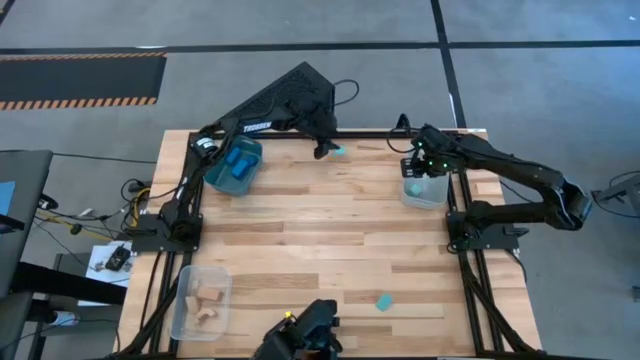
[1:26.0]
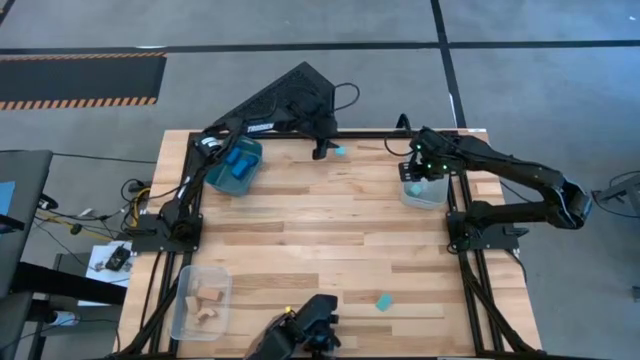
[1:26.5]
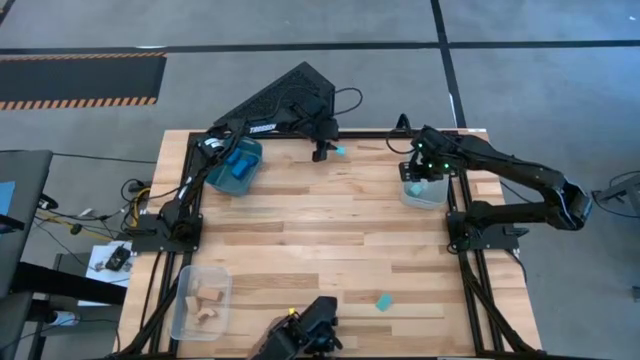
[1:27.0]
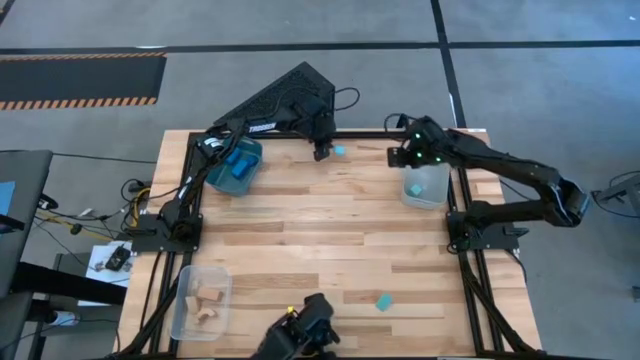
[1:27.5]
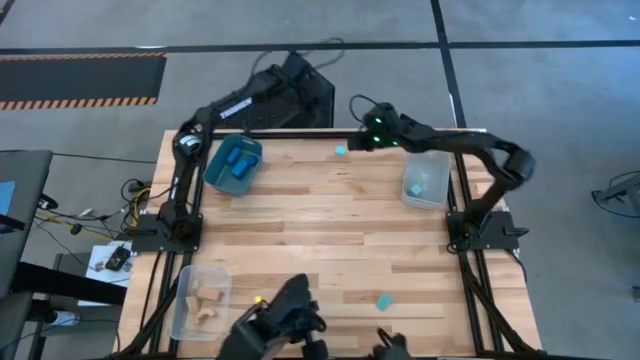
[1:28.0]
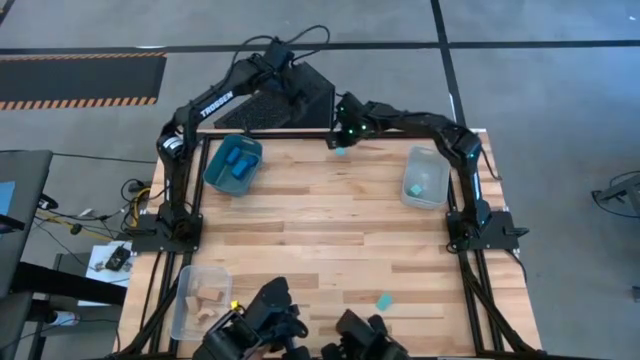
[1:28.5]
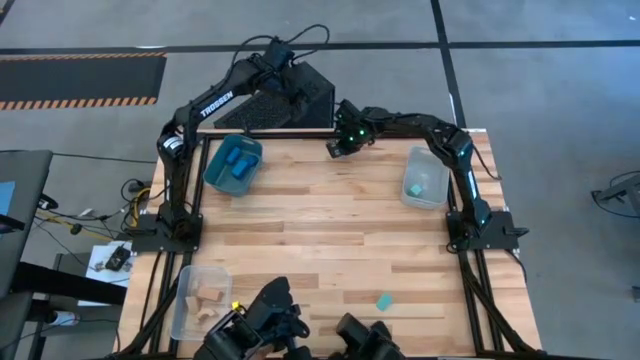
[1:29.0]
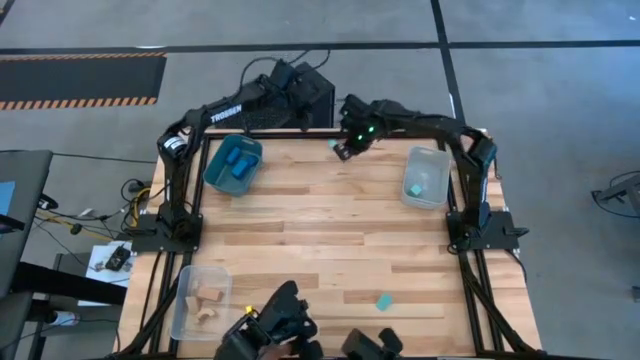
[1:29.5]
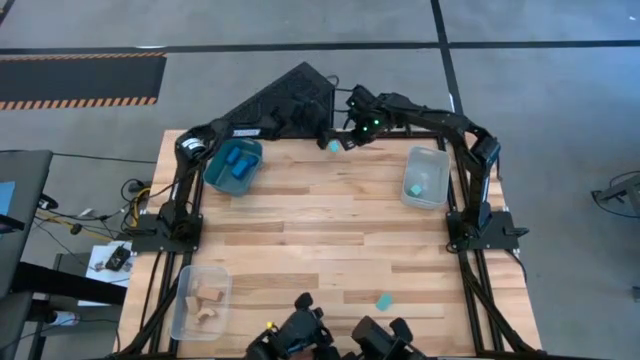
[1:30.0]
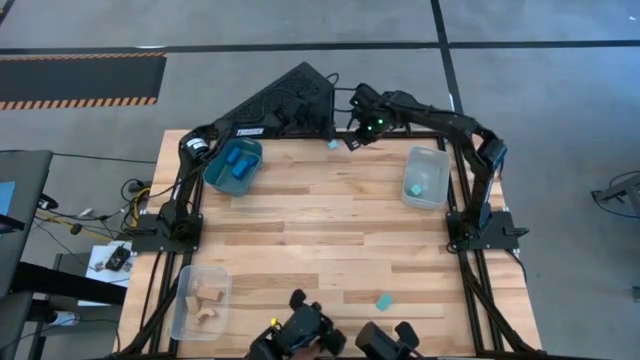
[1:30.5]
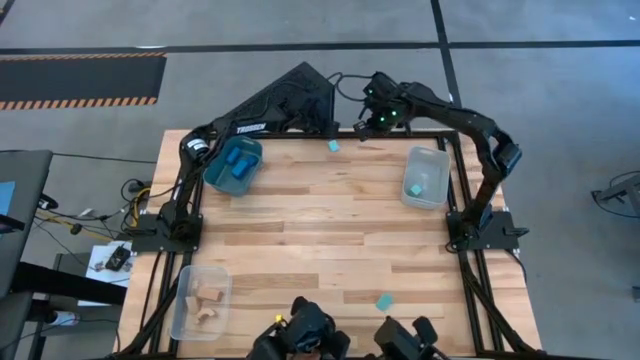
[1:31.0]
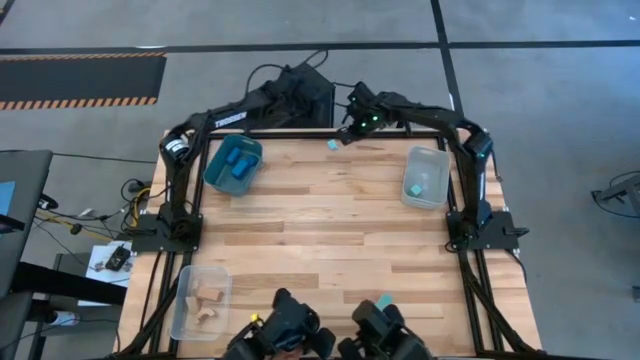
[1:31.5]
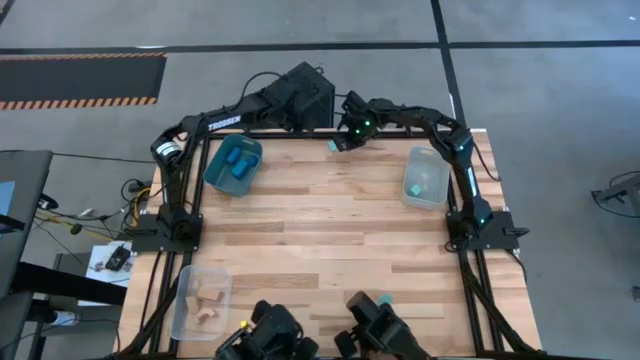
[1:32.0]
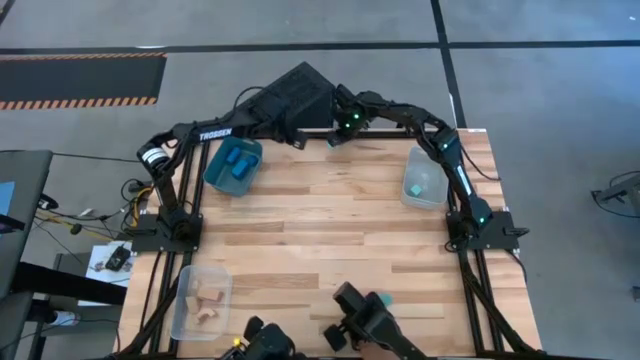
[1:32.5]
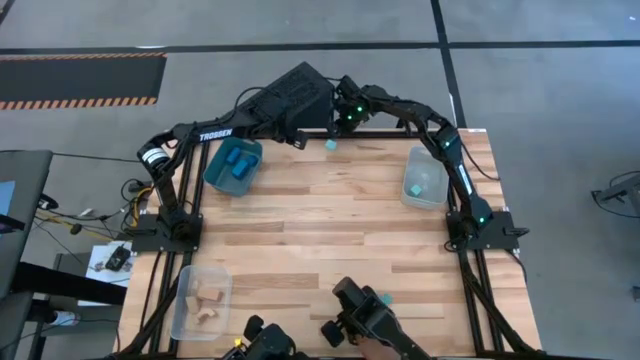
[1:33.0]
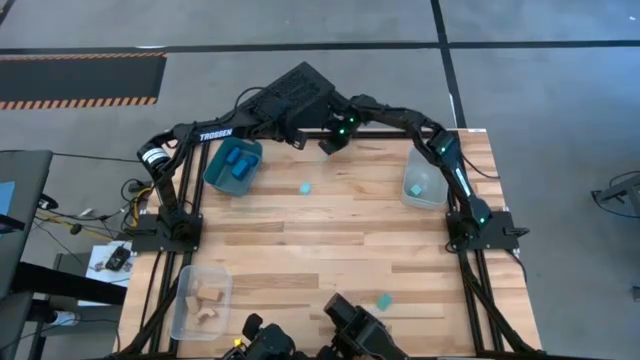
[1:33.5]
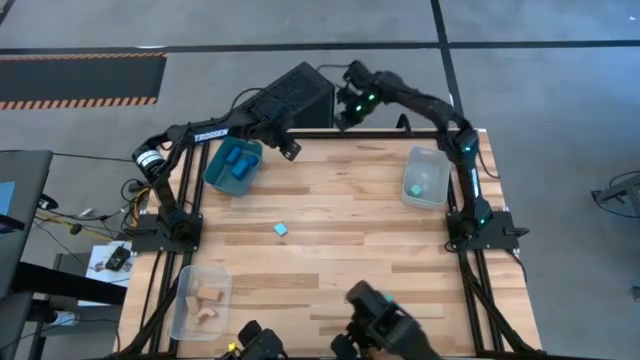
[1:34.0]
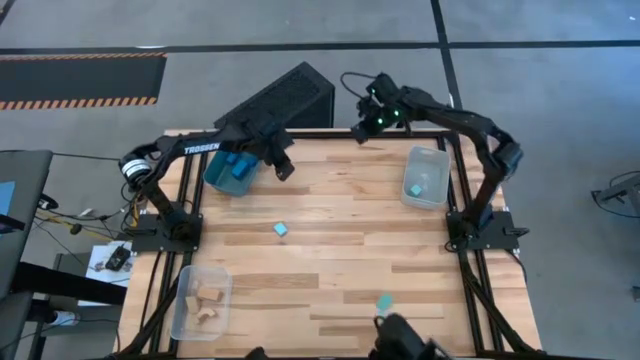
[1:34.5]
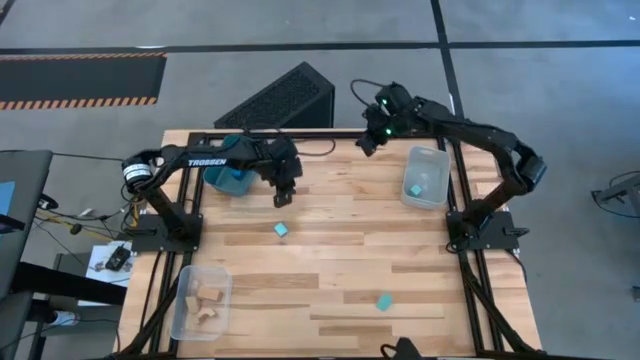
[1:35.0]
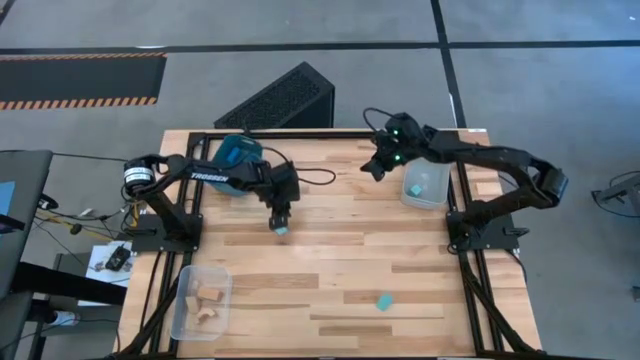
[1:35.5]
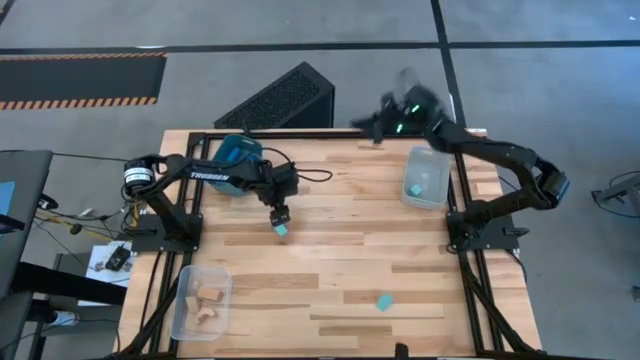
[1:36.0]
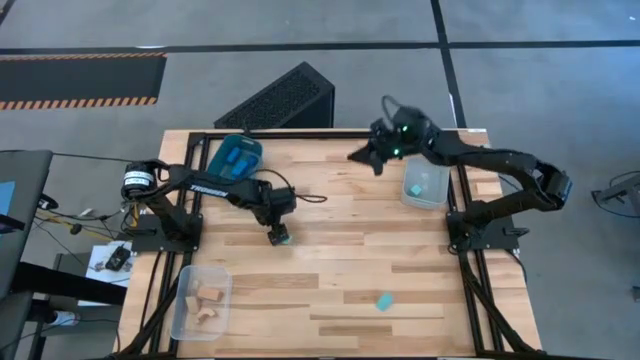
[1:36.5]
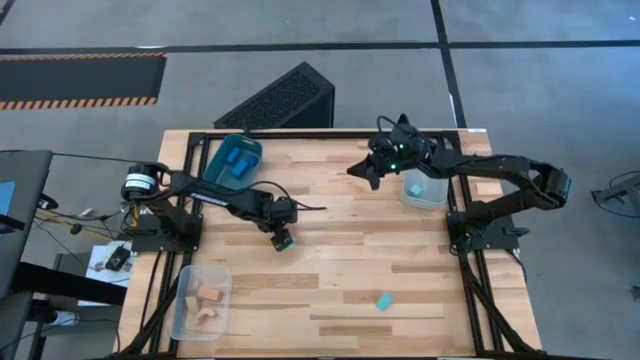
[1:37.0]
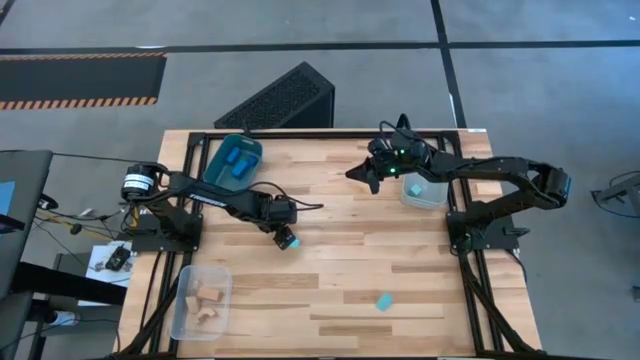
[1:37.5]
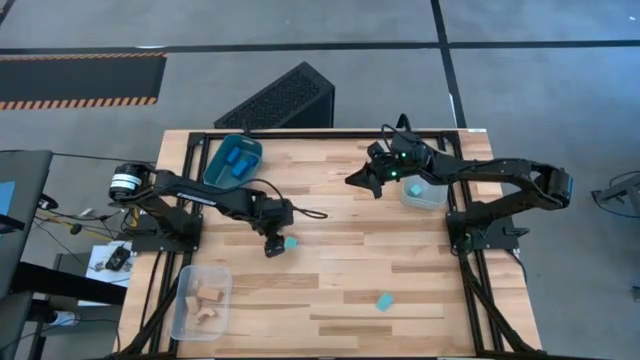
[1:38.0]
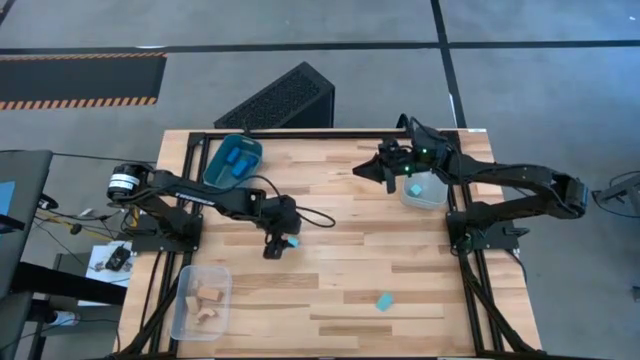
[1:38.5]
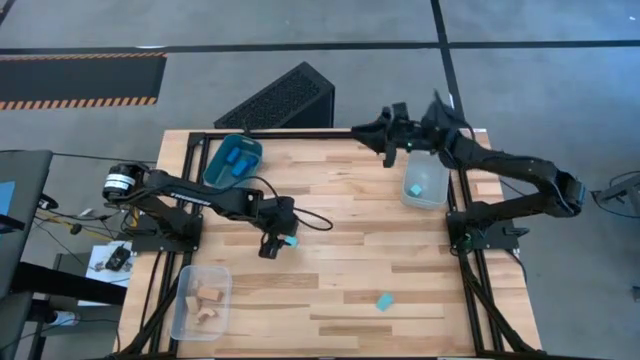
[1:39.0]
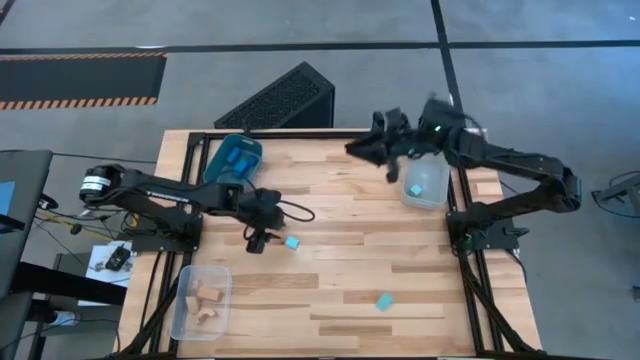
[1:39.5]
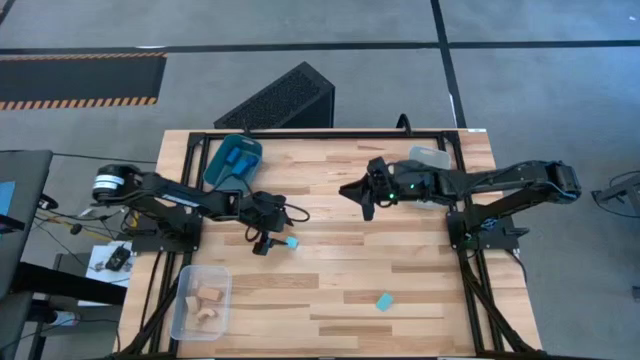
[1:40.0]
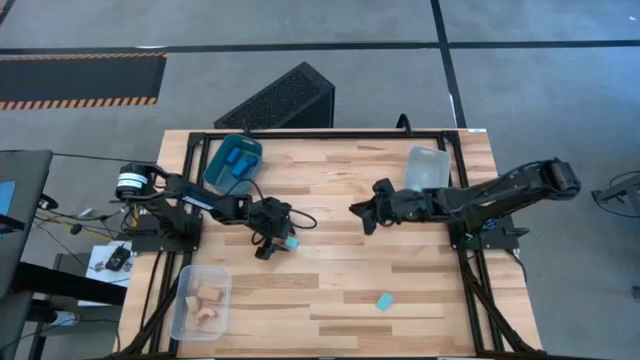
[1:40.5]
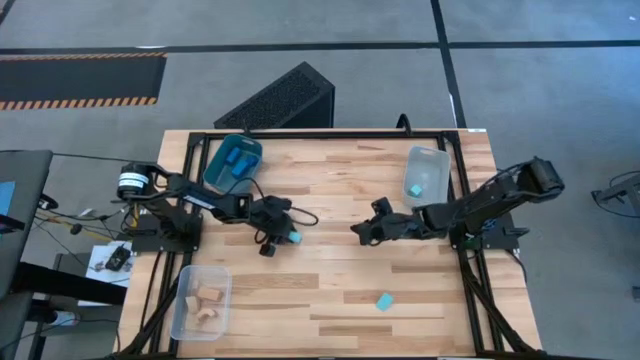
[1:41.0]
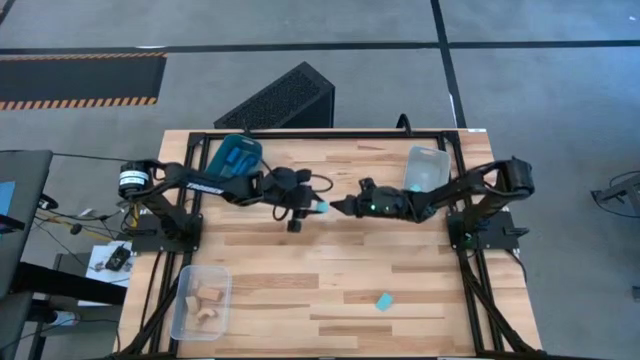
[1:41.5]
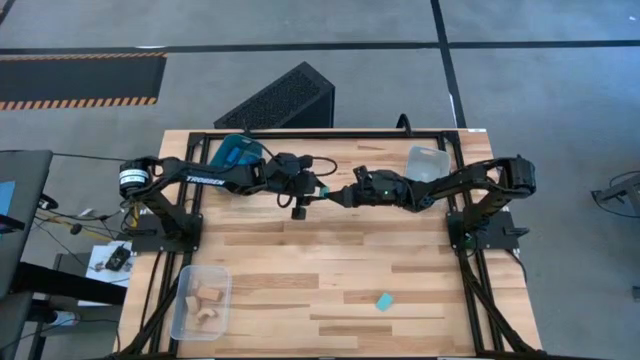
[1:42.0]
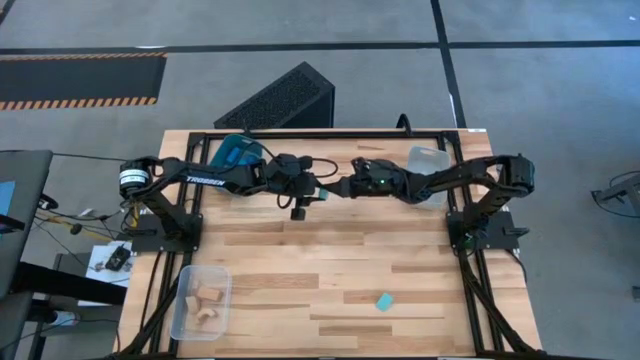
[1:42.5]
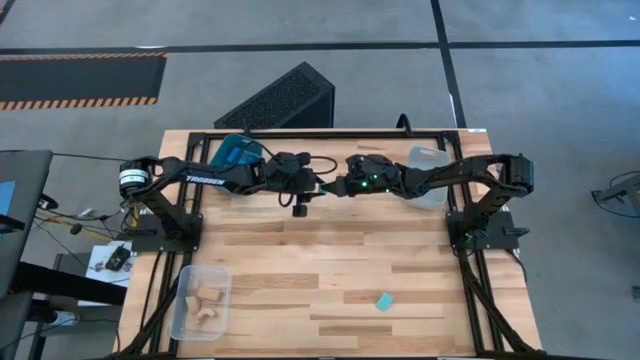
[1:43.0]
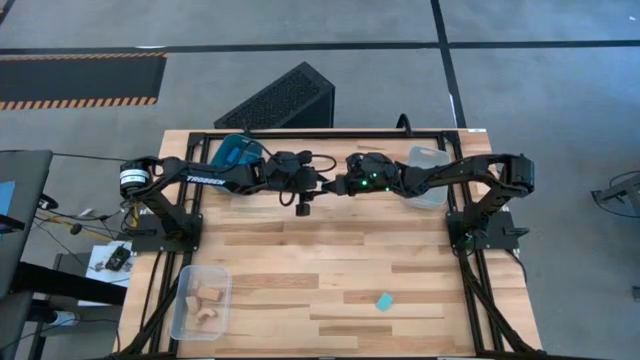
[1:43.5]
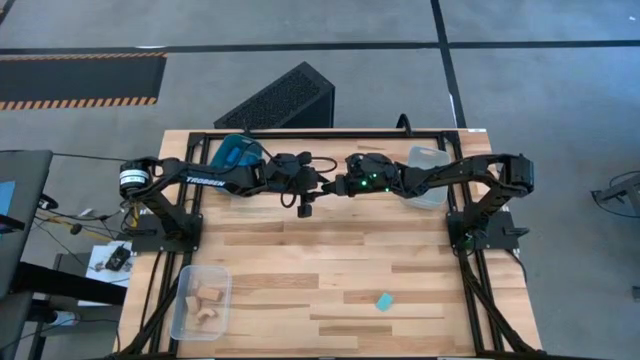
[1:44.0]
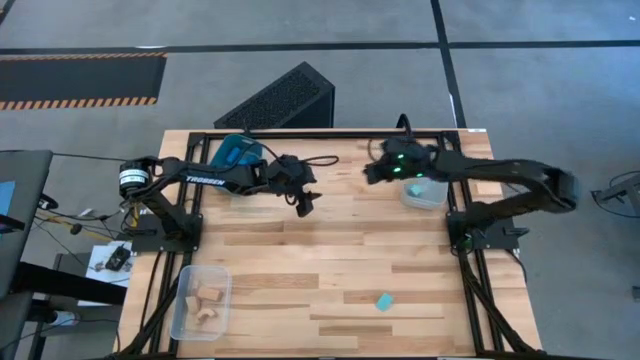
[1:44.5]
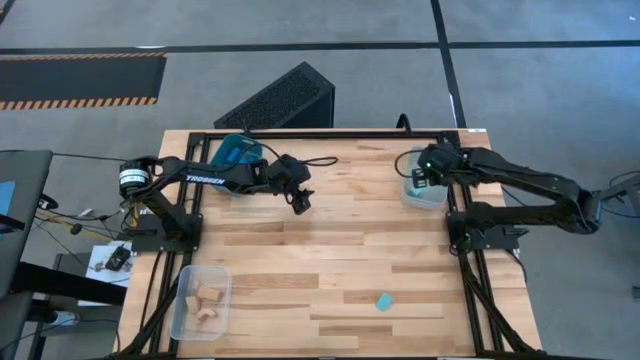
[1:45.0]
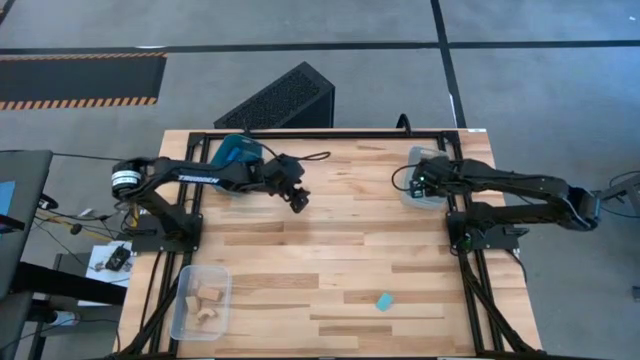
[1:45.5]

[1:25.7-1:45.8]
Task: Sort & place blocks by color
Put the top light blue block into the gray bin

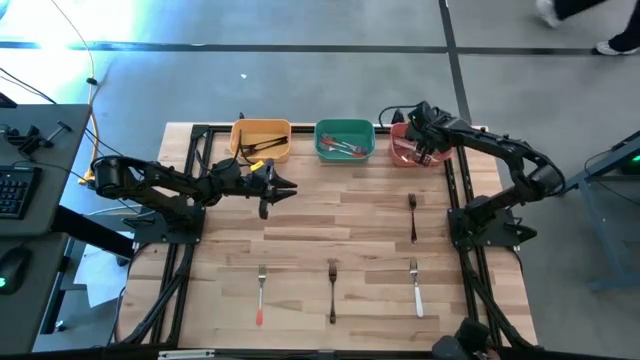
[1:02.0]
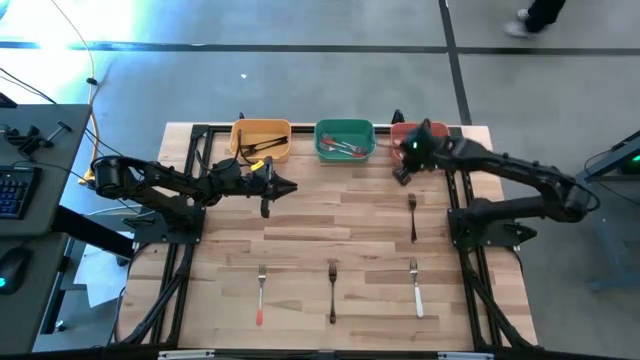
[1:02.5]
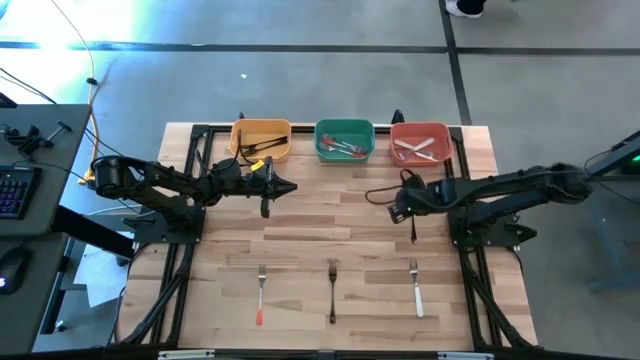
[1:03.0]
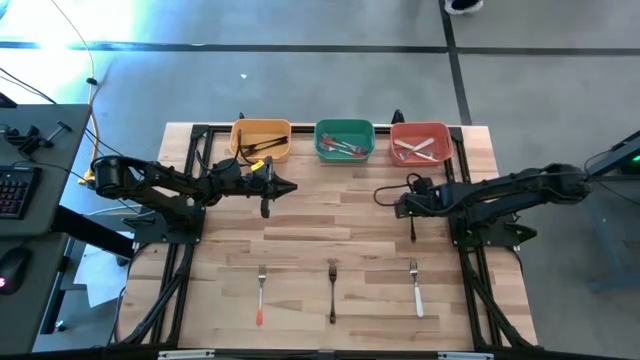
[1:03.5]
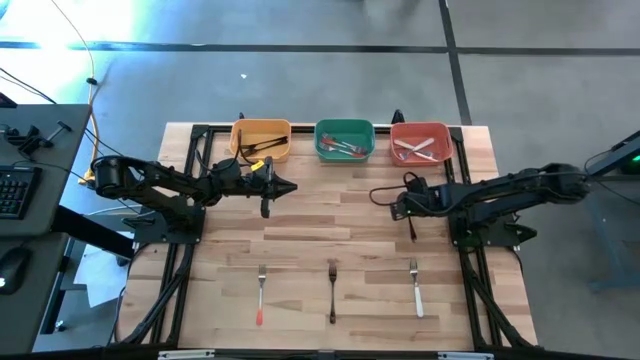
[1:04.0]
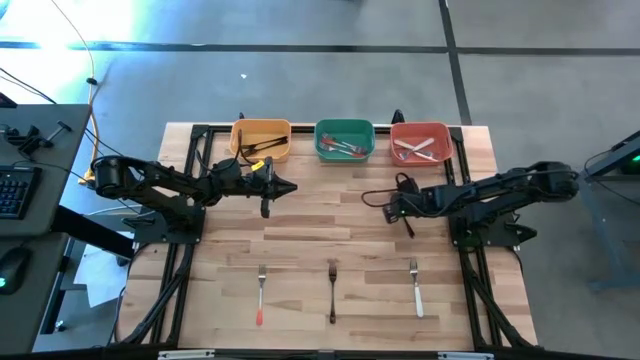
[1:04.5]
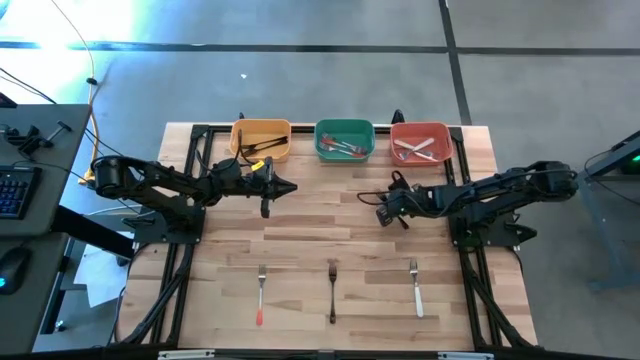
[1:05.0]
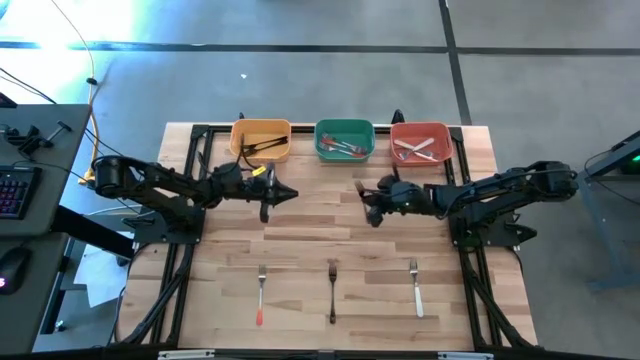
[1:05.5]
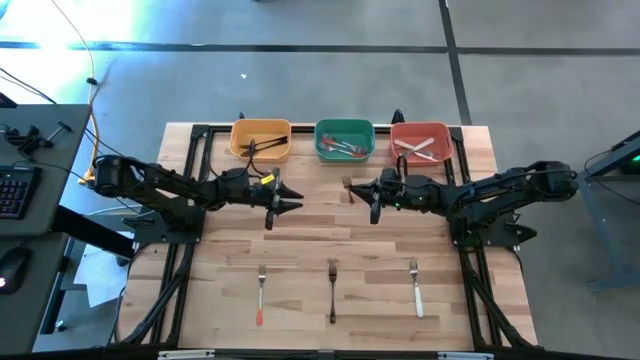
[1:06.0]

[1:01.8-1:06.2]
Task: Sort silverware by color (type)
Put the top black fork into the yellow bin
